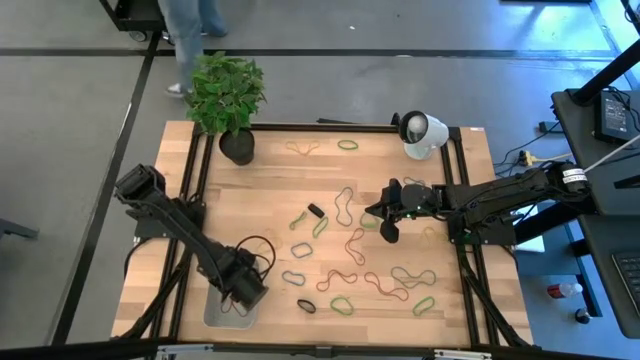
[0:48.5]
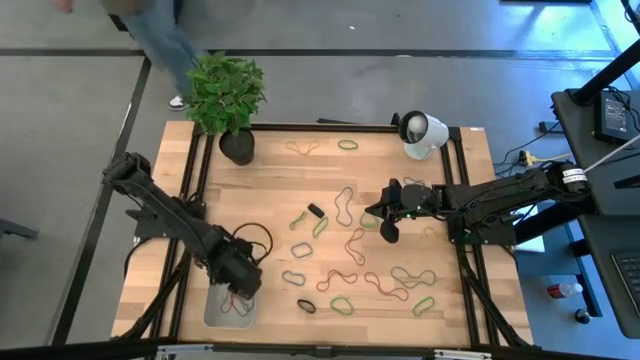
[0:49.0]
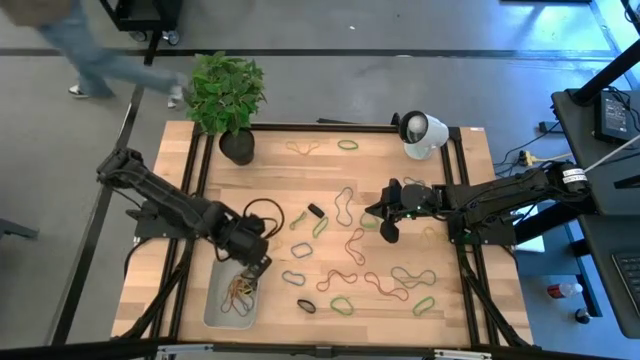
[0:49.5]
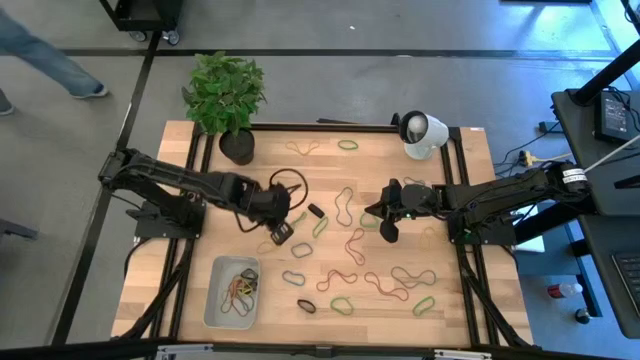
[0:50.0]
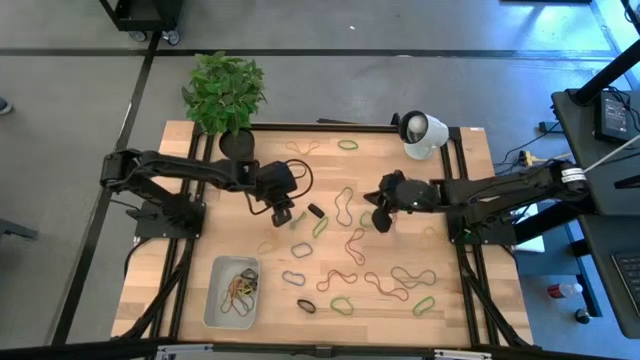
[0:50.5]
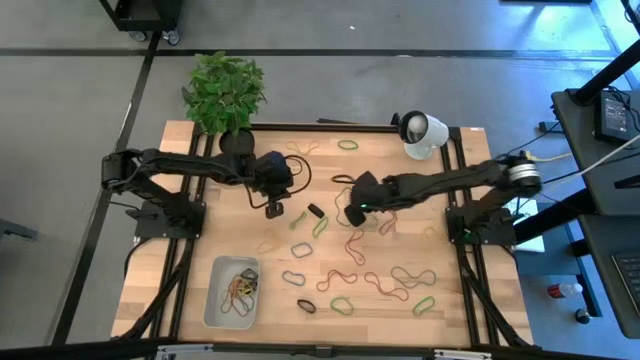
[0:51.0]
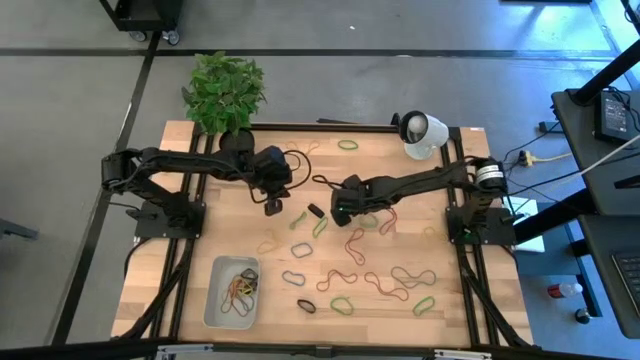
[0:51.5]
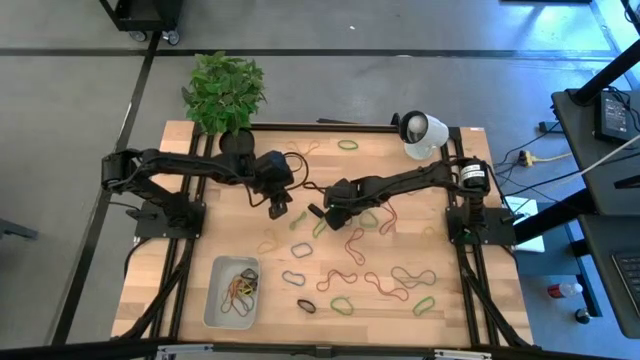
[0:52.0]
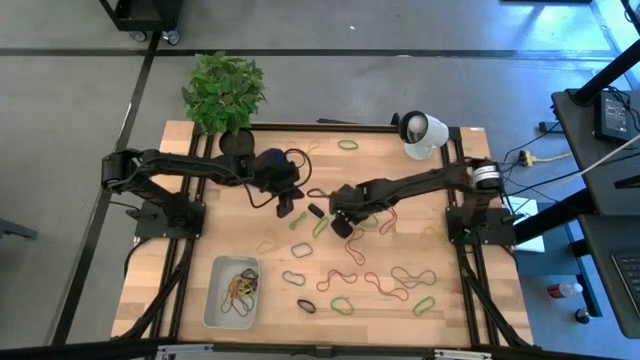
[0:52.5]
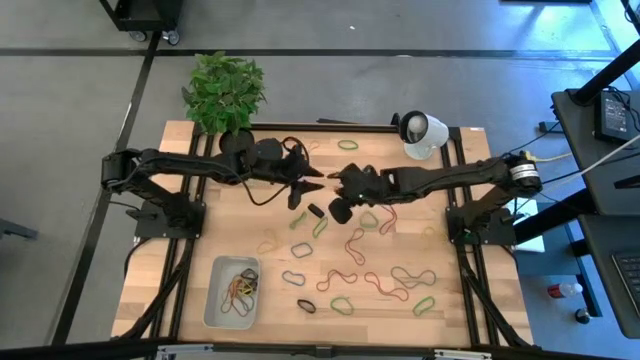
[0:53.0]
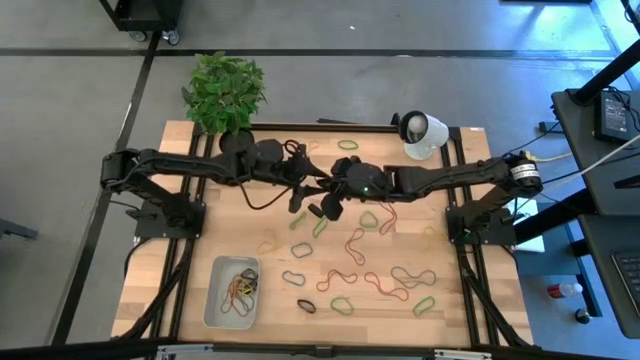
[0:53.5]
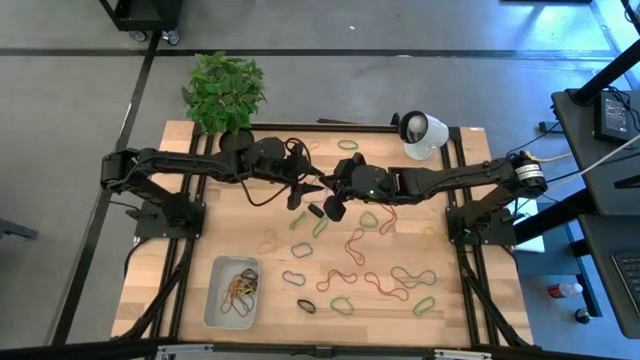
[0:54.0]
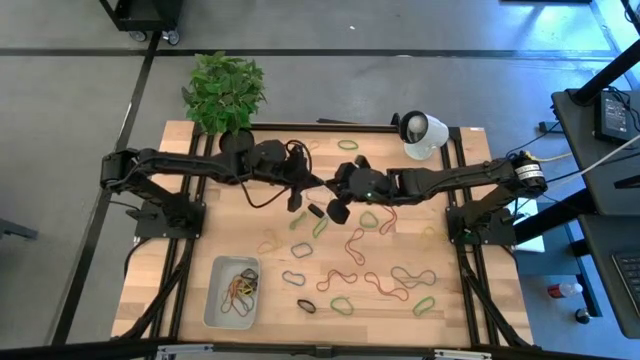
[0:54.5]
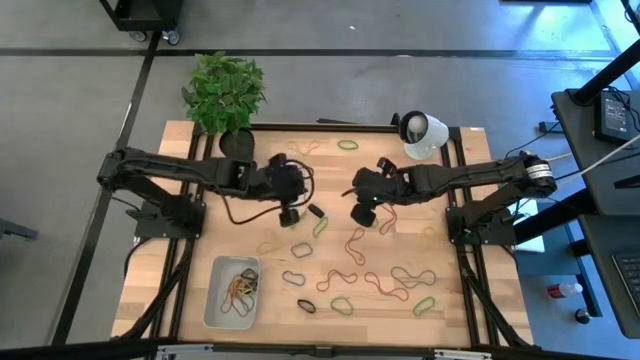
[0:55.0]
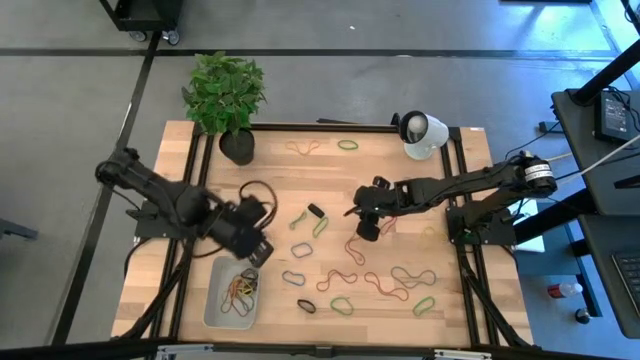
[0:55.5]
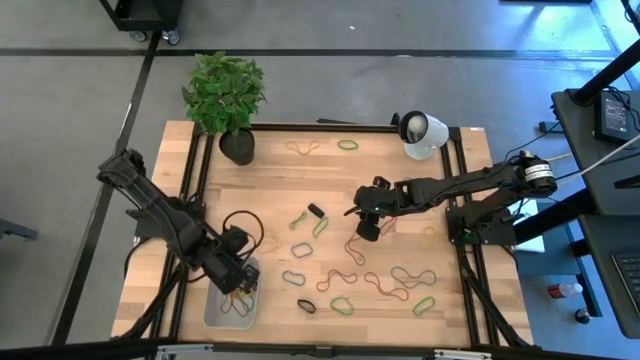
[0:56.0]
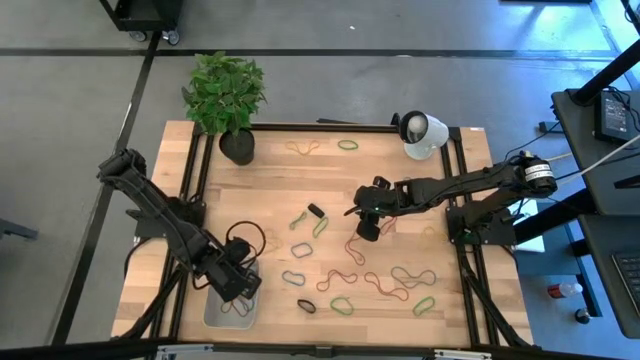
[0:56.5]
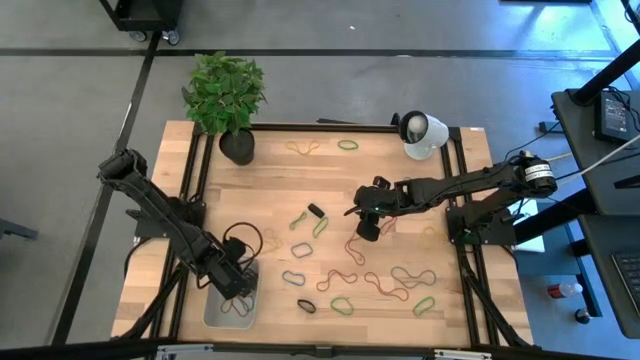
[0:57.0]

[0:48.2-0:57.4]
Task: Pick and place rubber bands into bin
Put the blue rubber band into the bin

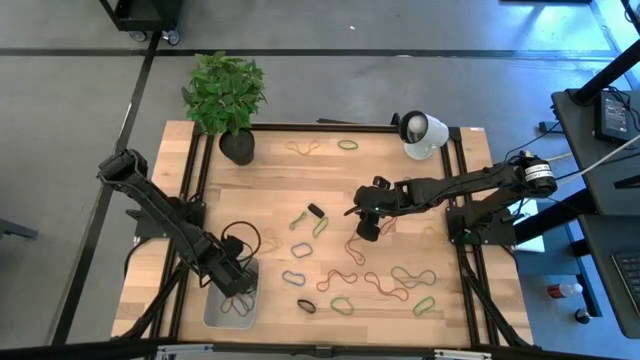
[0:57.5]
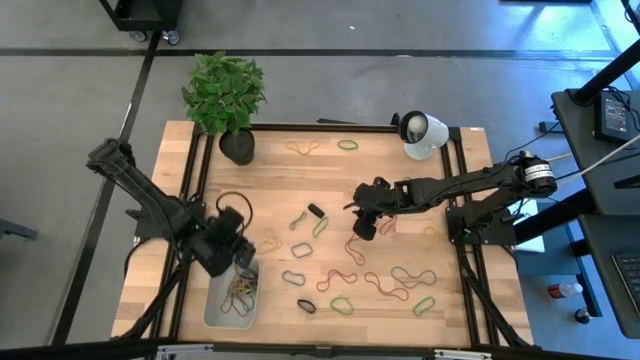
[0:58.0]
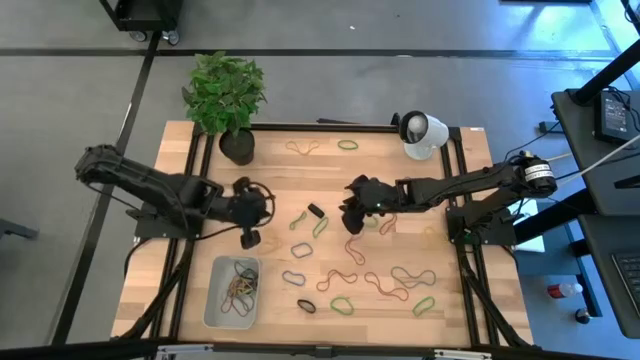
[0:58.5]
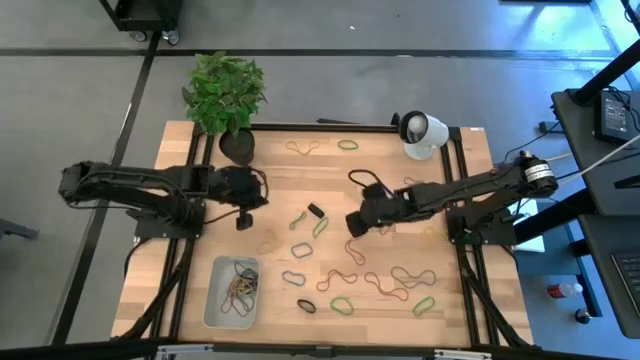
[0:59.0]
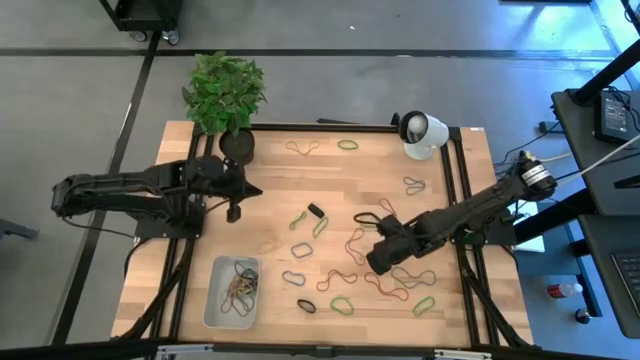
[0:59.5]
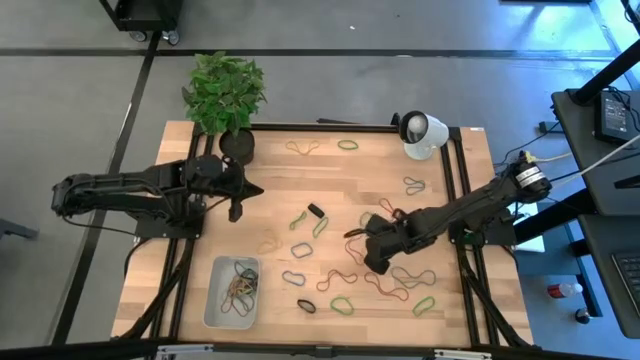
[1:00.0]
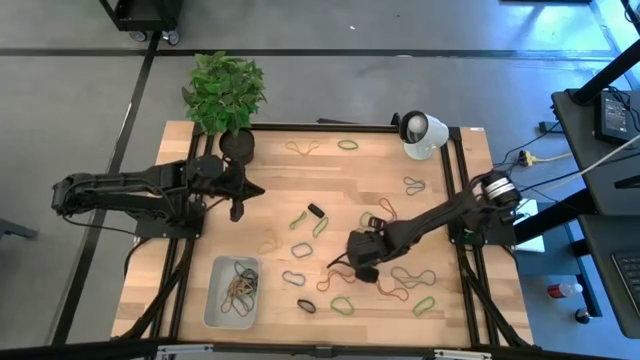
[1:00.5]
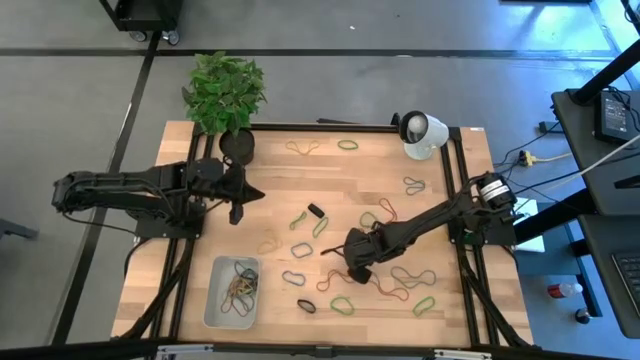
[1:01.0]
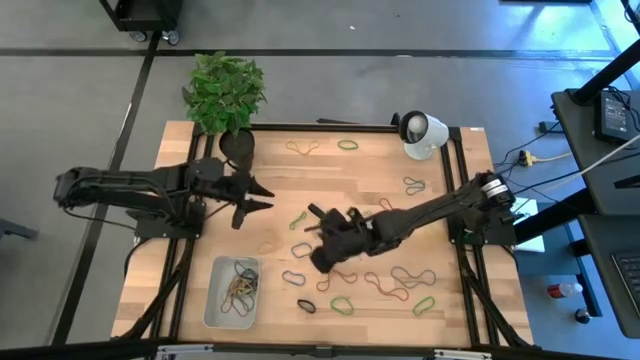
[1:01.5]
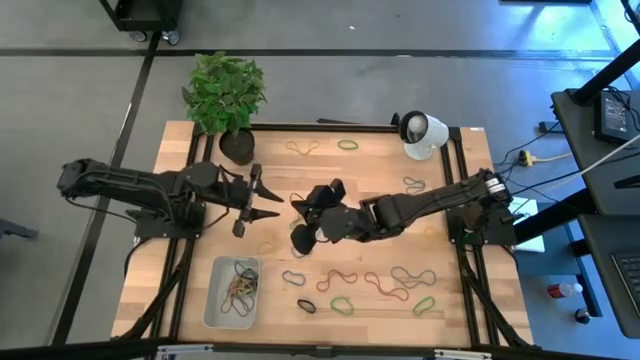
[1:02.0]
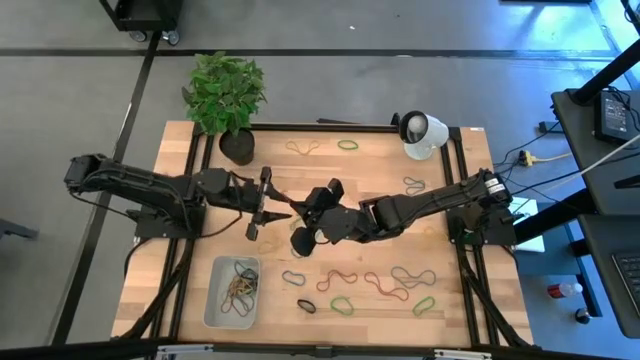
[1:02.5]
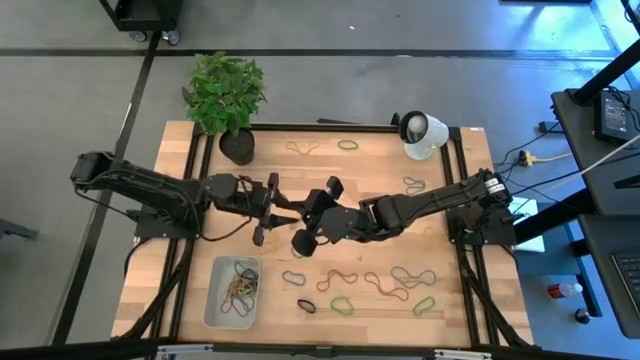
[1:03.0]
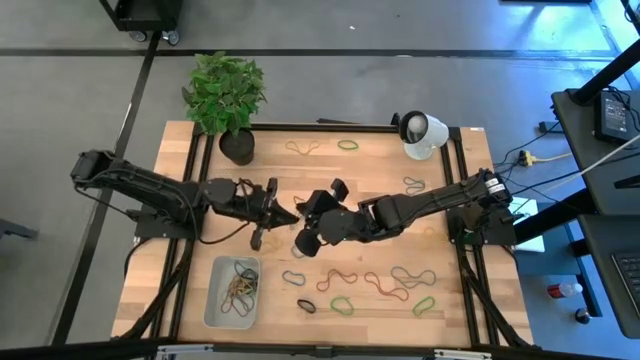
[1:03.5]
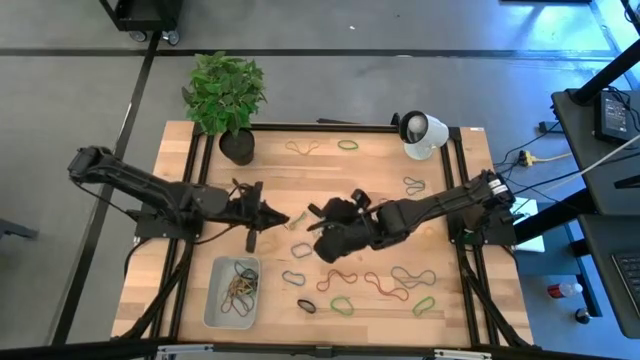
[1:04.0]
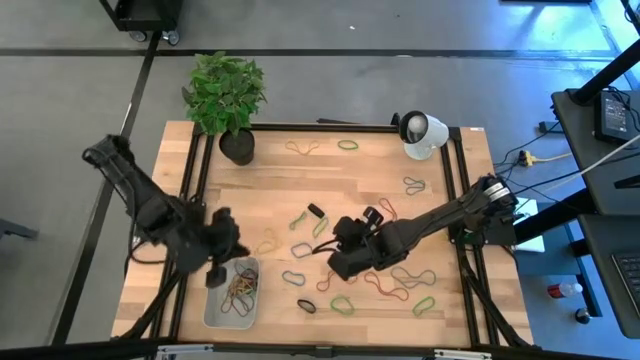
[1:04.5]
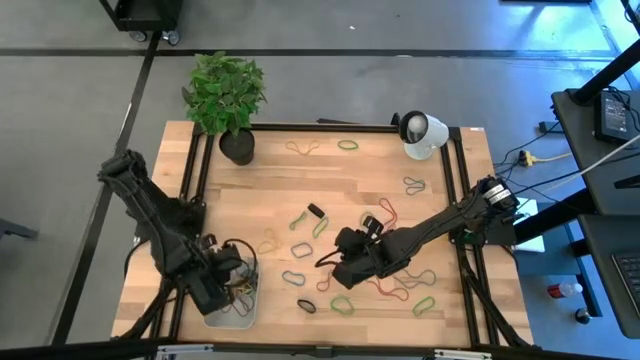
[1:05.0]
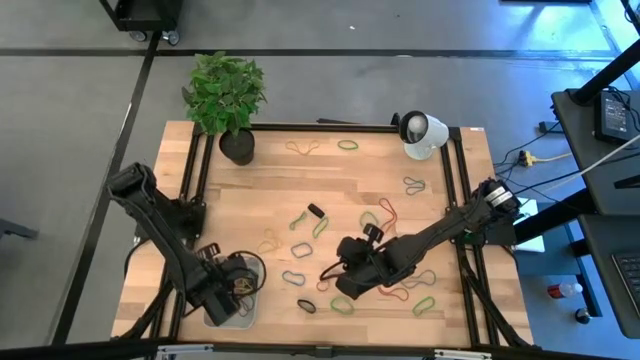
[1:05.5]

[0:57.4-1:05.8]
Put the red rubber band into the bin

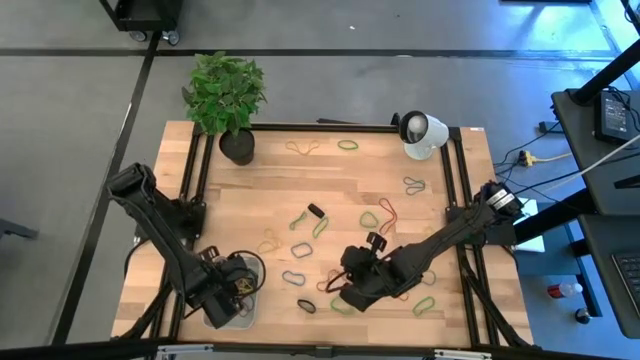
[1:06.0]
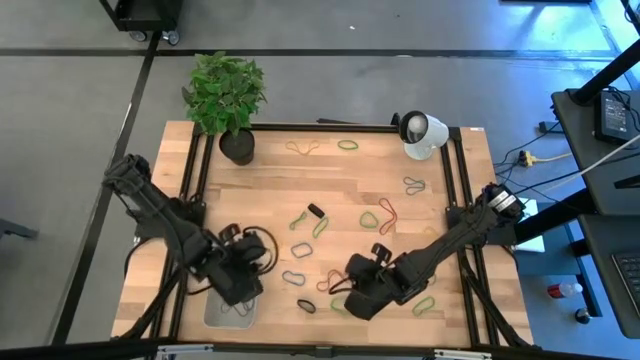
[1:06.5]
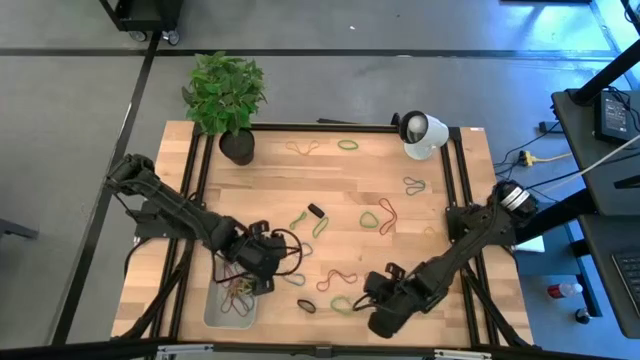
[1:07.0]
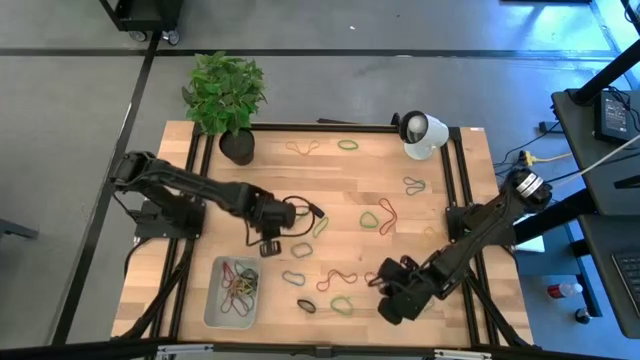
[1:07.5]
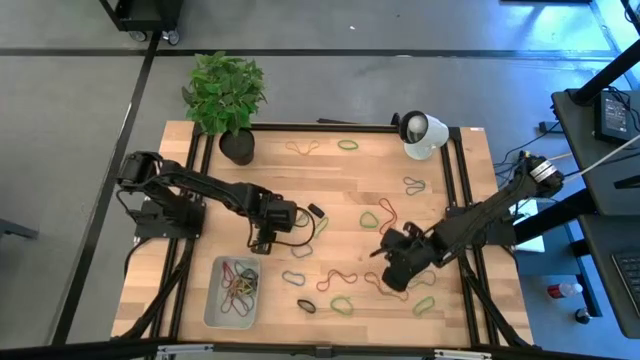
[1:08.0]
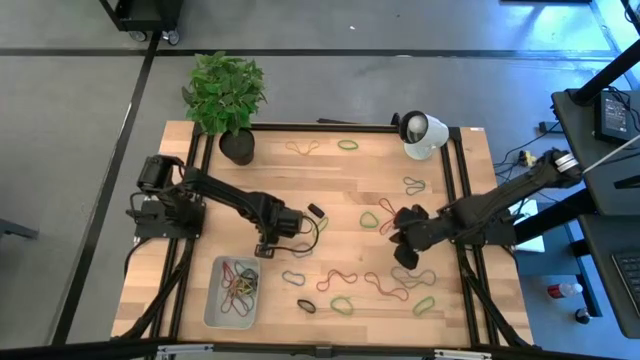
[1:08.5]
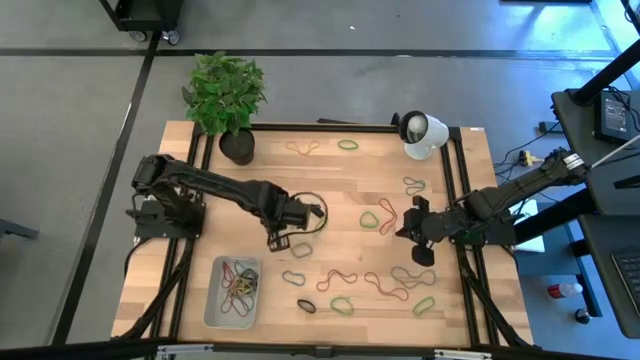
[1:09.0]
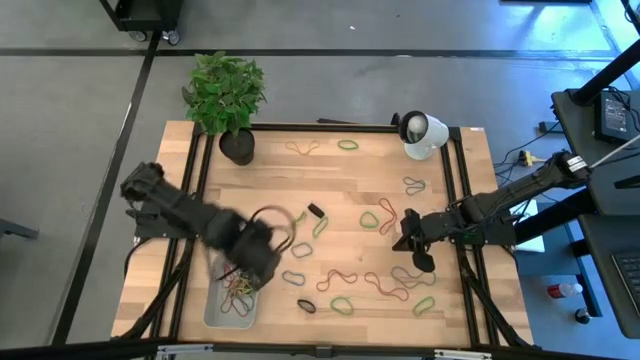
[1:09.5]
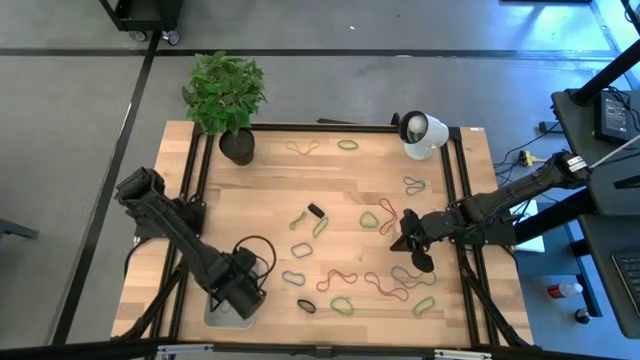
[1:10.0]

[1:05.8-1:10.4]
Put the yellow rubber band into the bin
